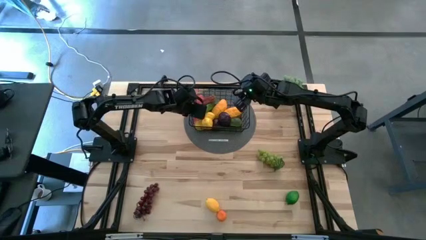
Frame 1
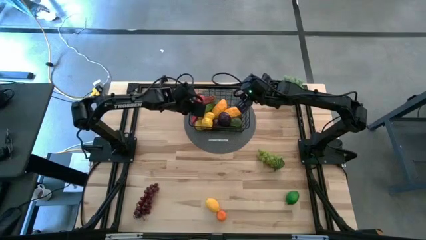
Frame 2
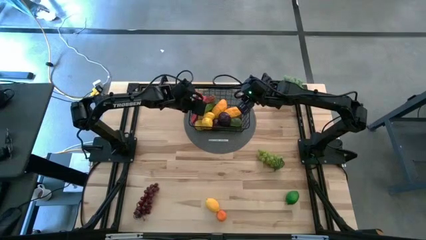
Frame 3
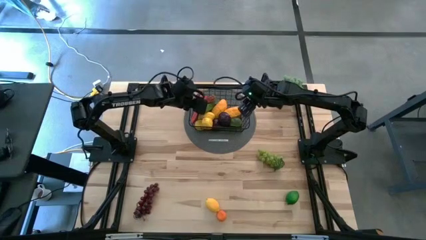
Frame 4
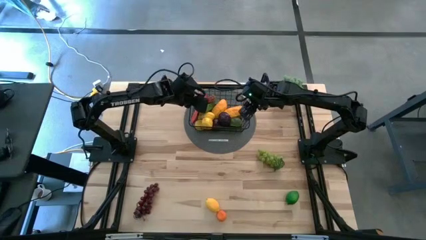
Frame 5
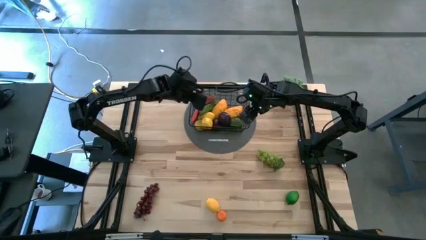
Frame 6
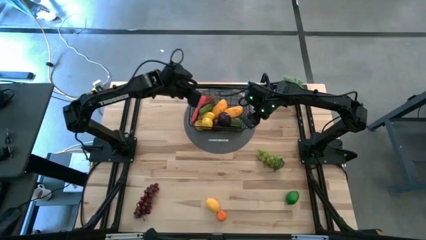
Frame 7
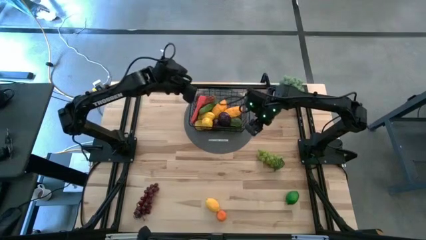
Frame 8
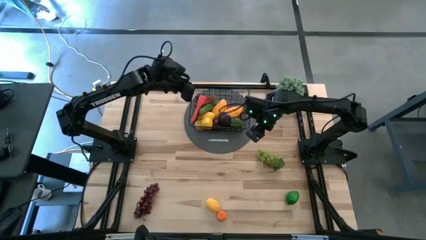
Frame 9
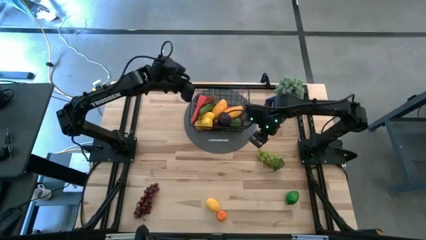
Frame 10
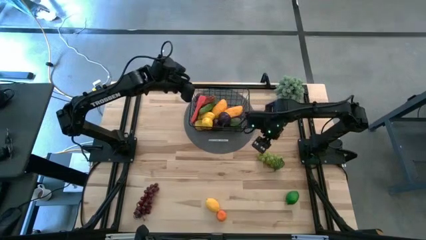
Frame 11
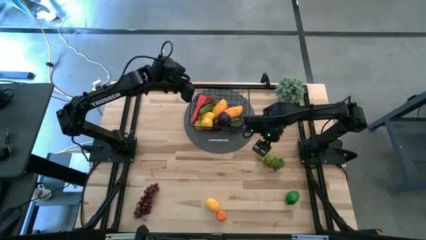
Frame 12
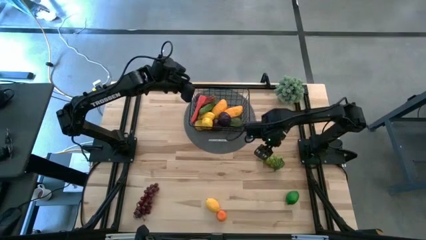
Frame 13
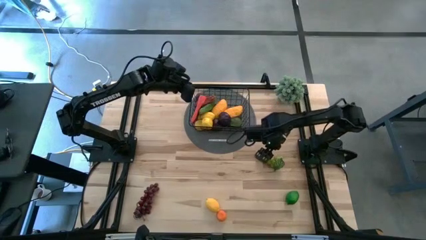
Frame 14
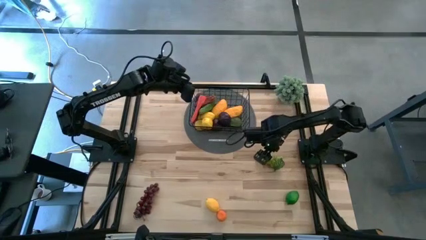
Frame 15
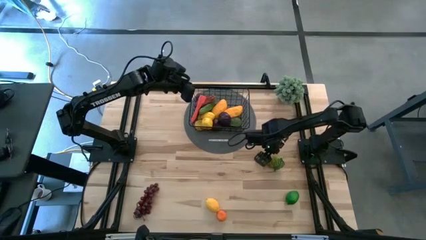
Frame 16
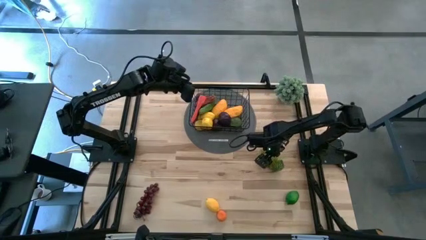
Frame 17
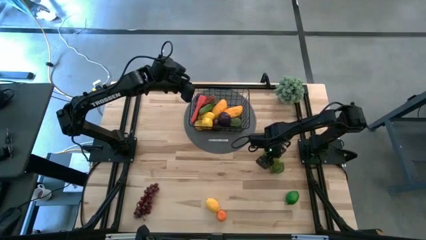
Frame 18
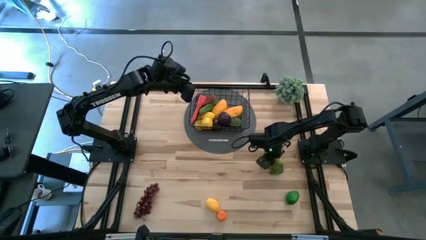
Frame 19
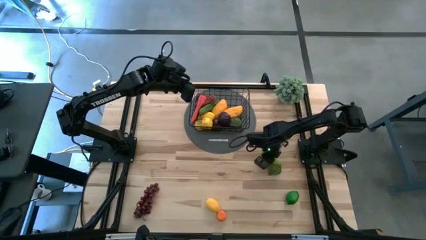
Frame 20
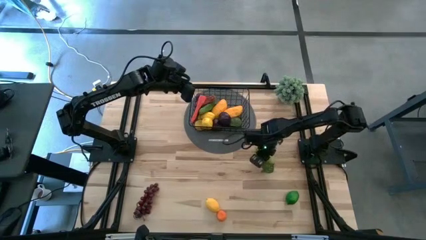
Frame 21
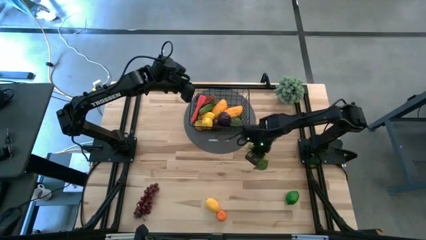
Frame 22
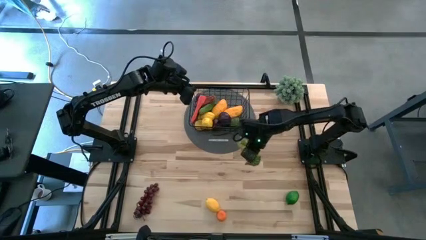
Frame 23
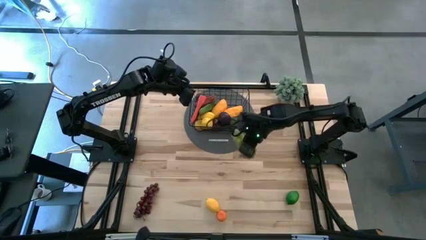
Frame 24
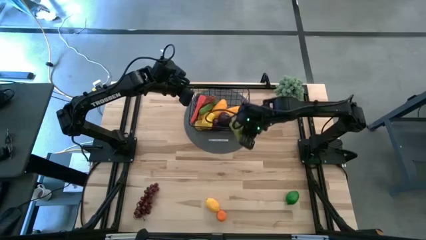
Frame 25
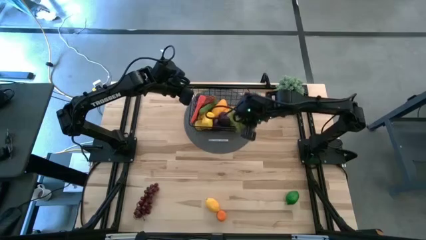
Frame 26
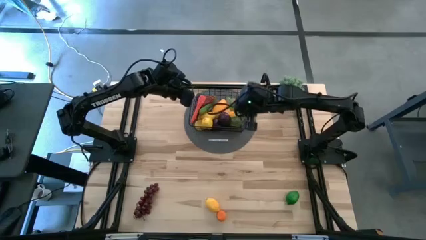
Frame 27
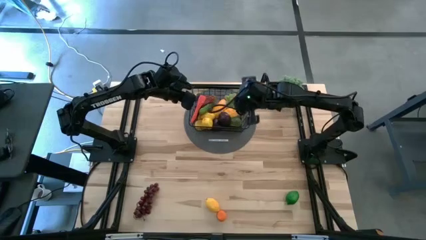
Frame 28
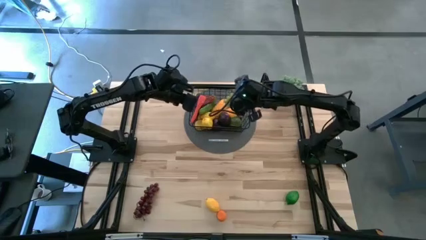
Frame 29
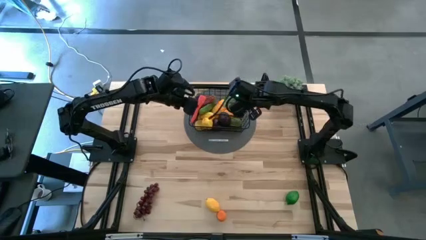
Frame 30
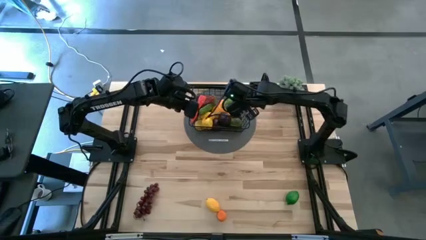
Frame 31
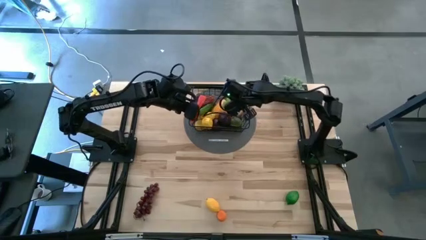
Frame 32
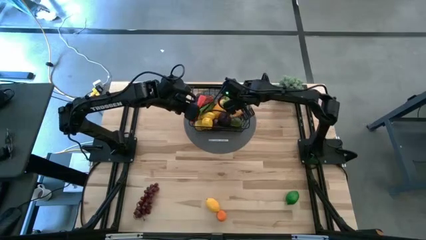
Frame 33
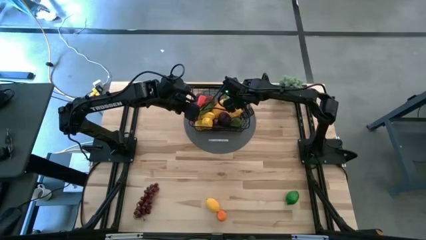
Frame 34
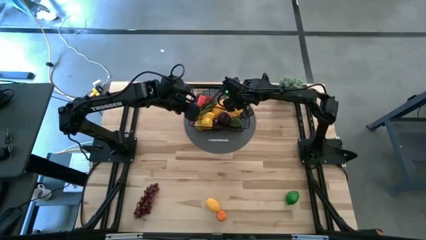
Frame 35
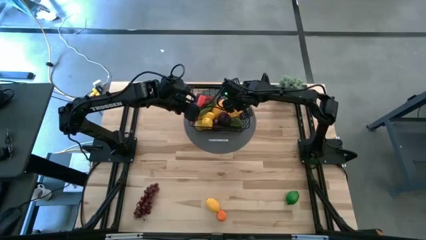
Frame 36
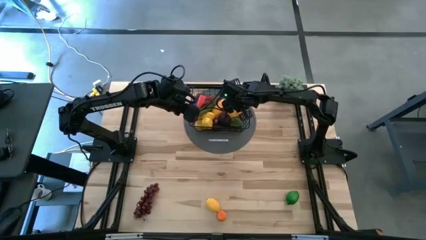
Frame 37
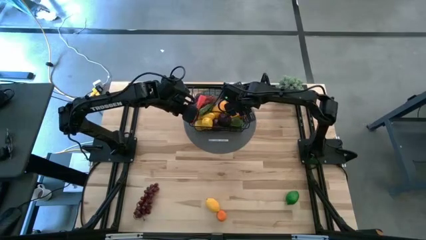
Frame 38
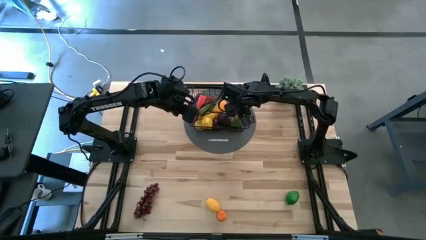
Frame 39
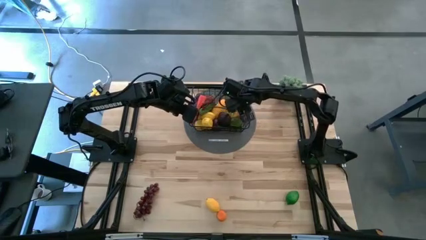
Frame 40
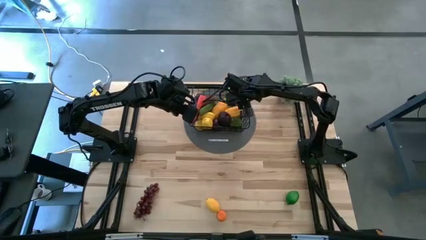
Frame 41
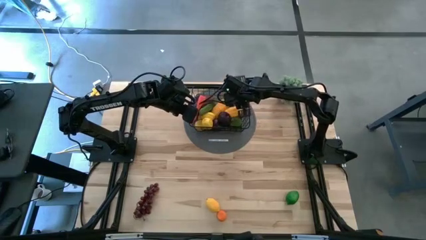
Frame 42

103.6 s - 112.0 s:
Task: Build produce basket
Put the green grapes into the black wire basket

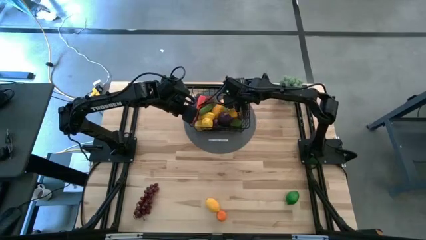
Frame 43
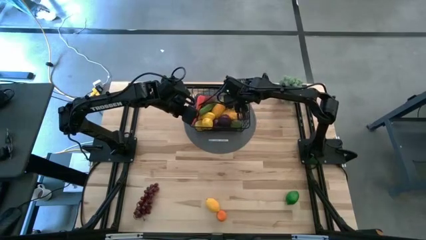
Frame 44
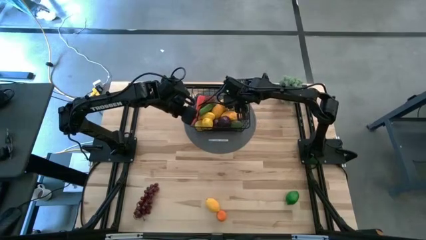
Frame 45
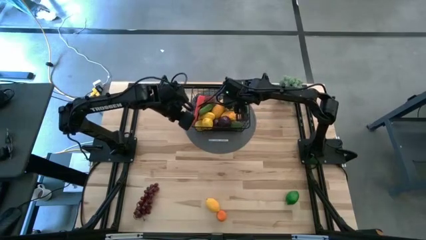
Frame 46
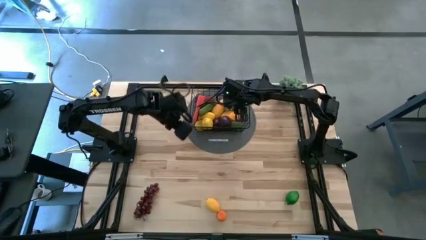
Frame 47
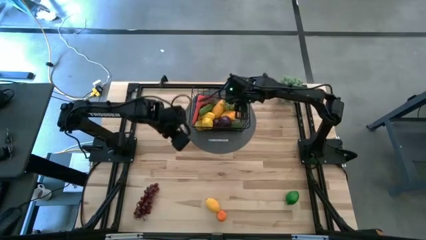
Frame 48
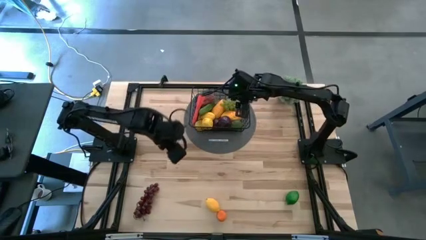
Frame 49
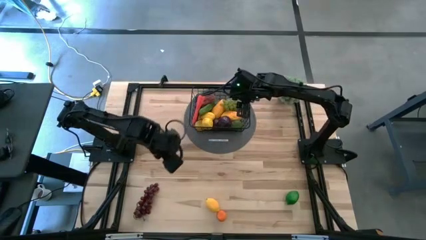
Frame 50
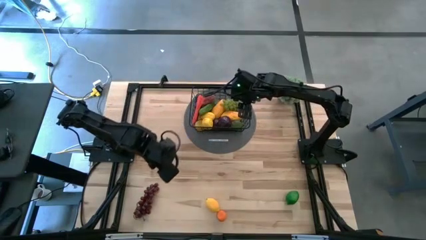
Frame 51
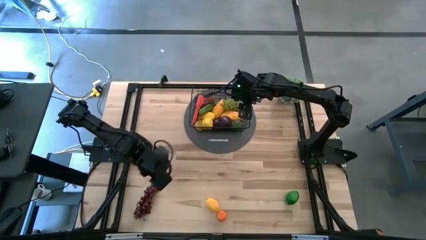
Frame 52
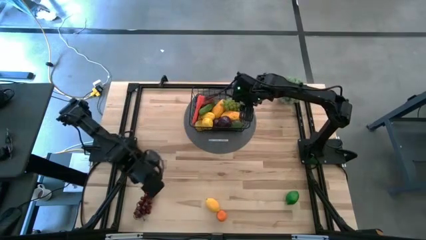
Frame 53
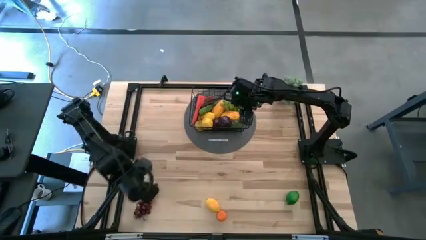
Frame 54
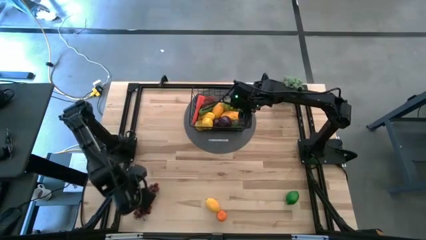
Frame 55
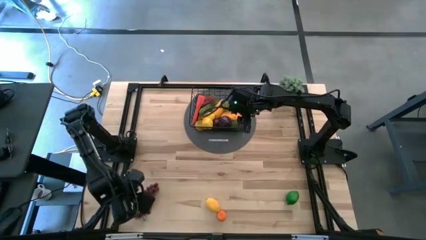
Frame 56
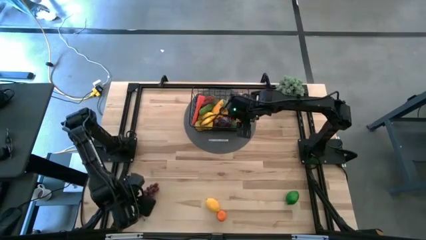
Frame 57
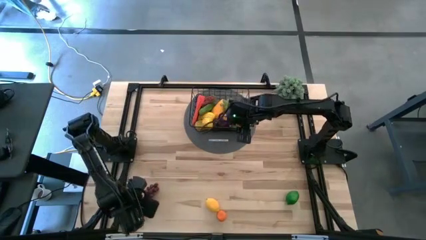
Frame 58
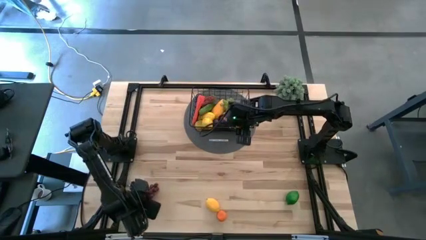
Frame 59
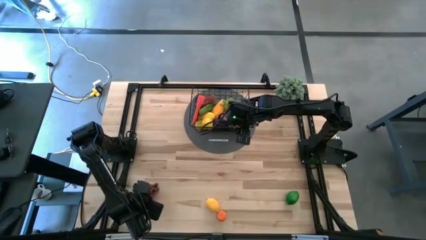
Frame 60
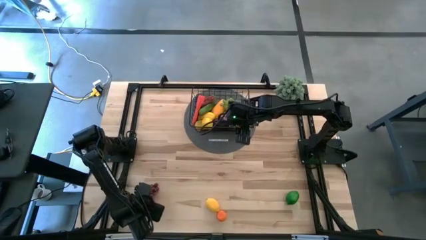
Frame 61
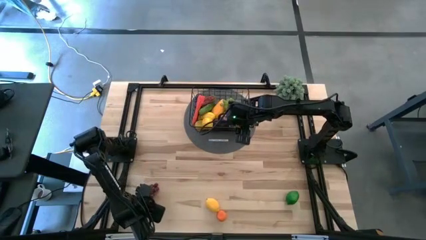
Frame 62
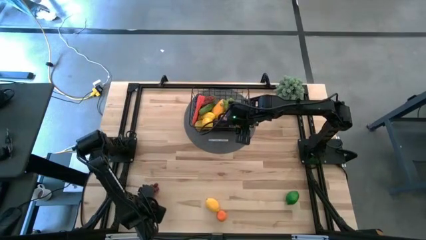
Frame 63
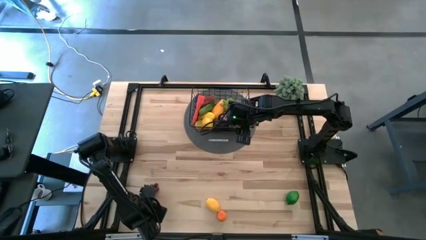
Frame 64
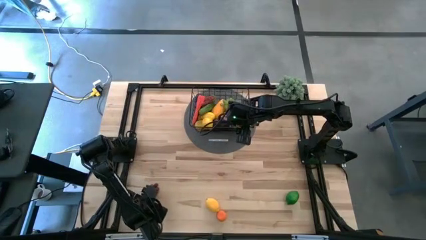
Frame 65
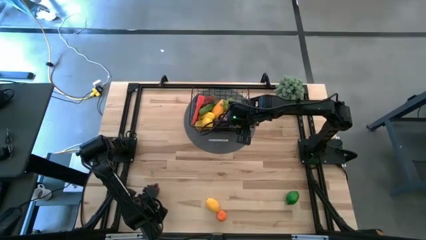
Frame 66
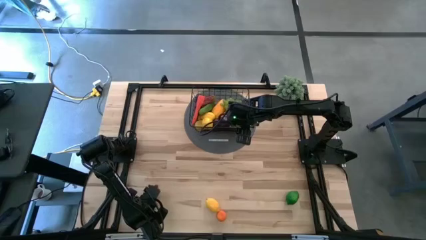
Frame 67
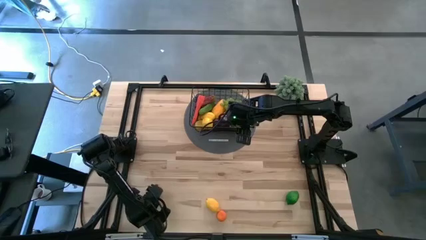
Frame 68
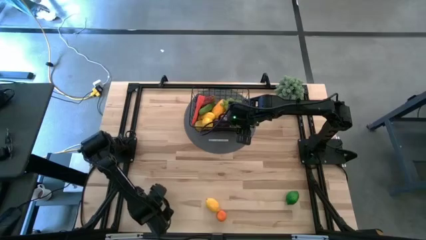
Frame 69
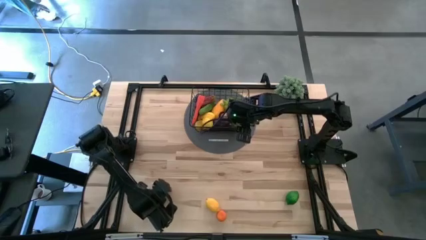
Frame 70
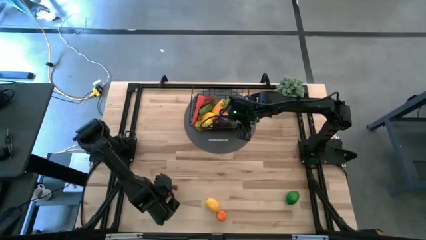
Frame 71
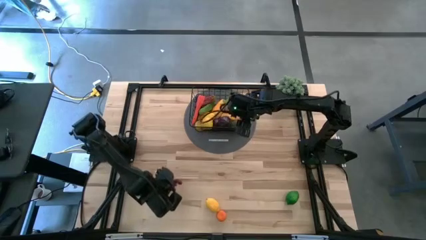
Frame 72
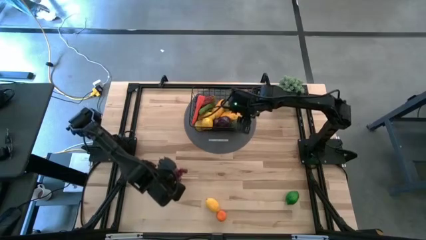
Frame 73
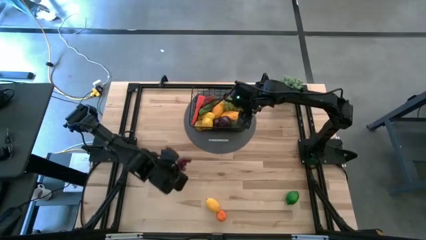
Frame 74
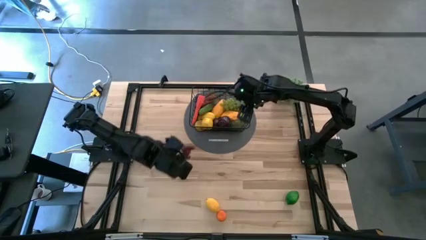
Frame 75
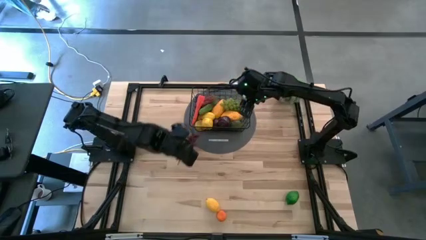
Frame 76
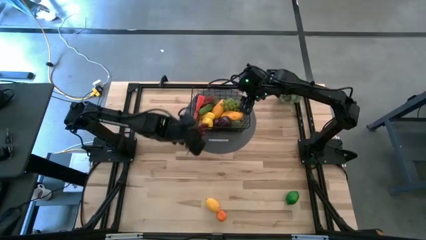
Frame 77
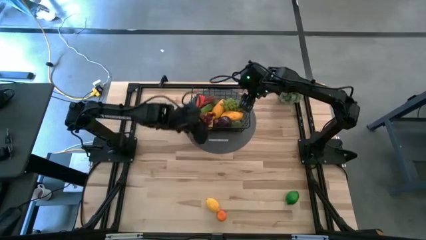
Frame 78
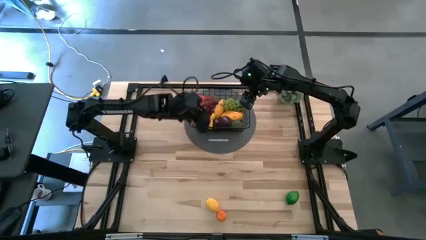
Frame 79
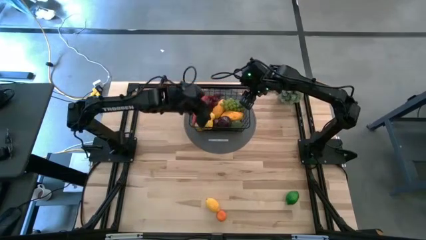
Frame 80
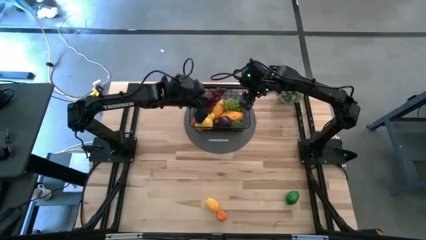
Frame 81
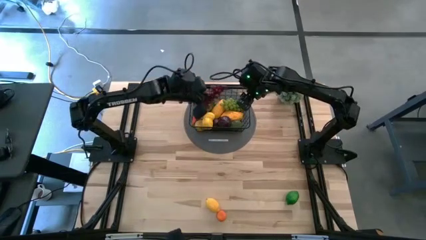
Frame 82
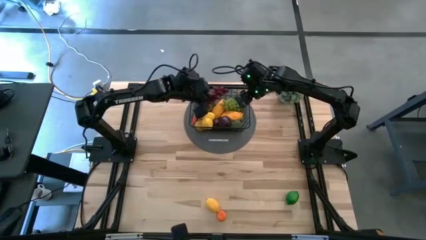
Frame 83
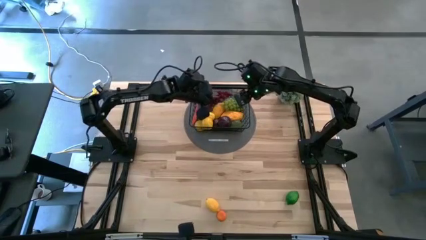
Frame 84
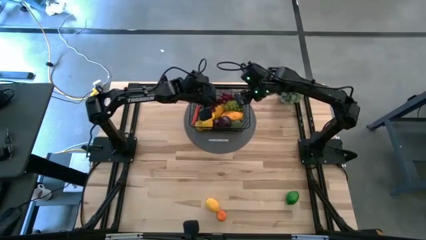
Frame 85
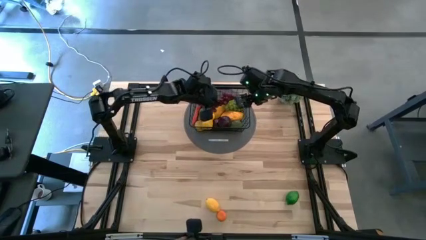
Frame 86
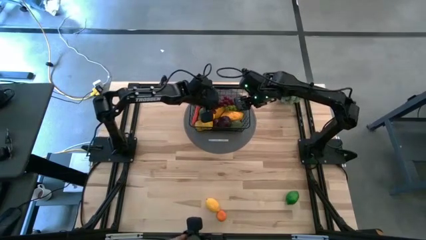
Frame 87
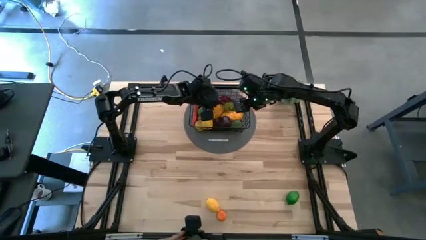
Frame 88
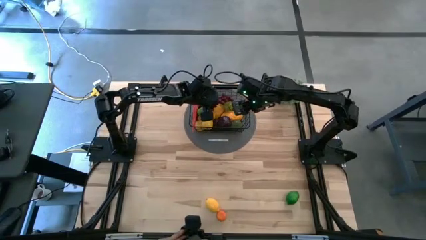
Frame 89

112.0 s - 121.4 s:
Put the red grapes into the black wire basket
